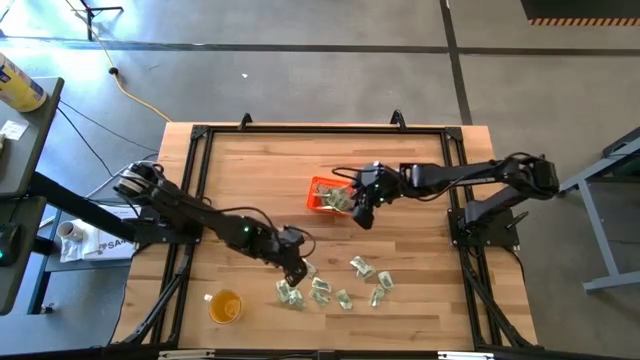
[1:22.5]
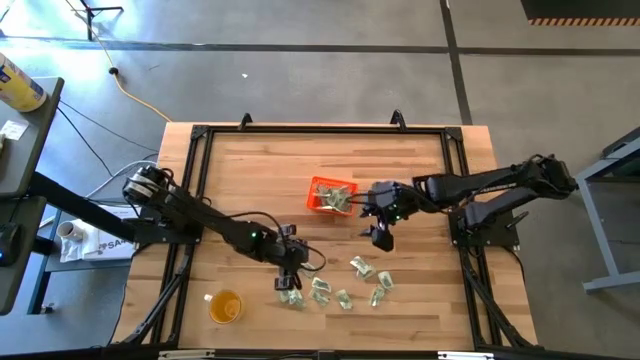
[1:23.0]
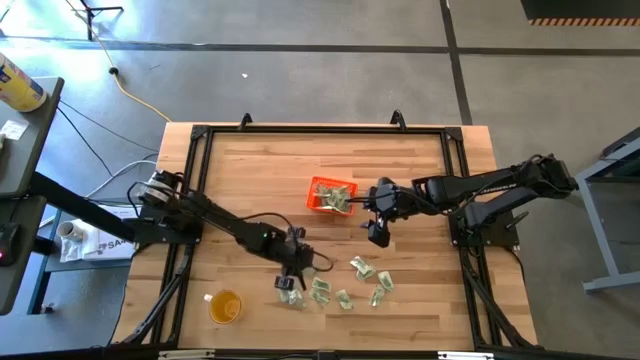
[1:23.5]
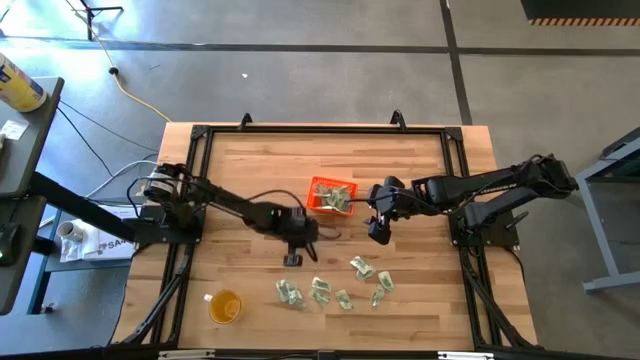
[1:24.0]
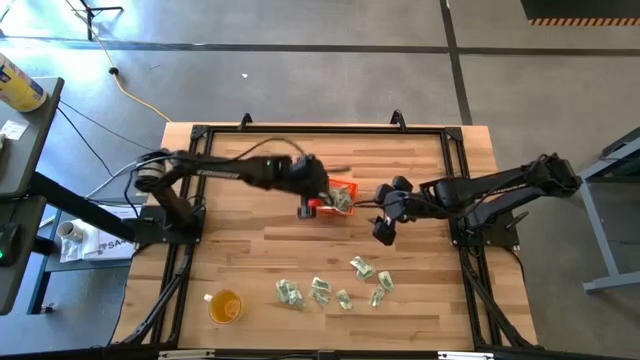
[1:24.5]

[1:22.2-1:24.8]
Task: Pick and place Stevia / Truvia into bins
Put the stevia packet into the basket

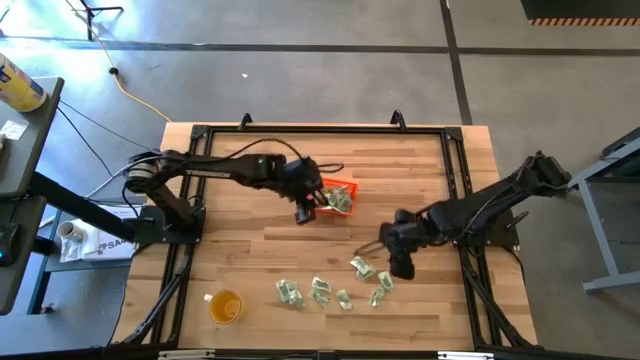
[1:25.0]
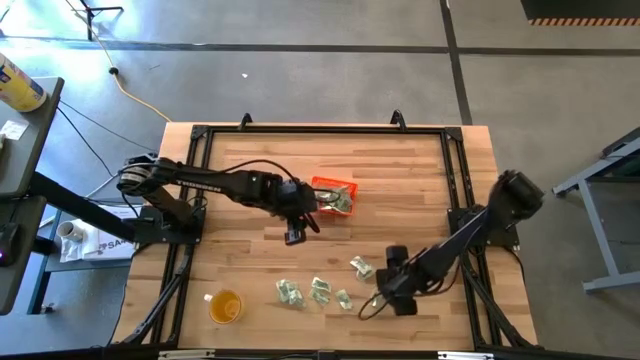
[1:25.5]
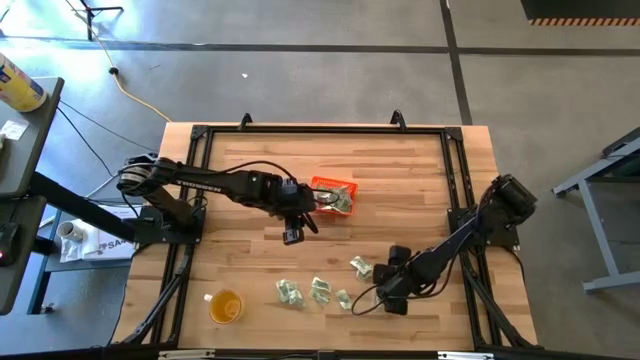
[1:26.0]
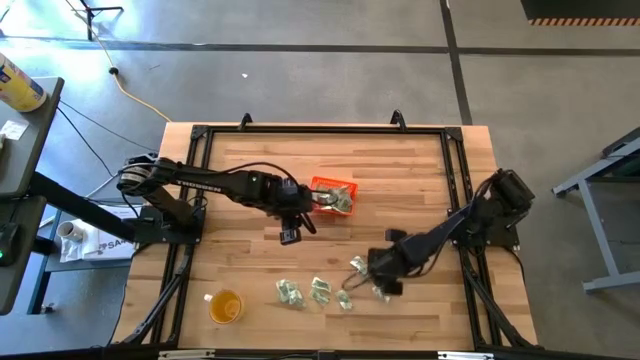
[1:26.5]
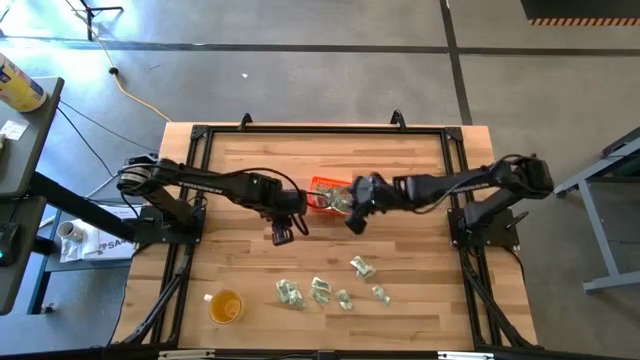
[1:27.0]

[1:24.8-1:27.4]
Put the stevia packet into the basket

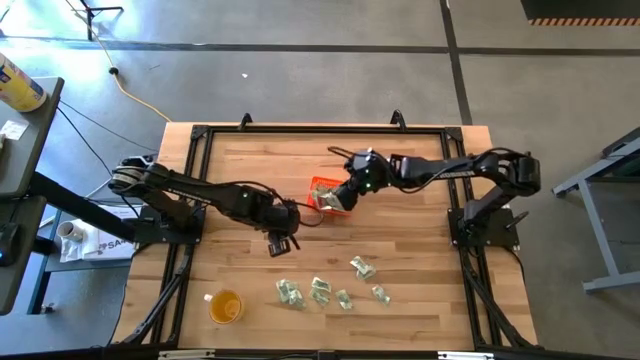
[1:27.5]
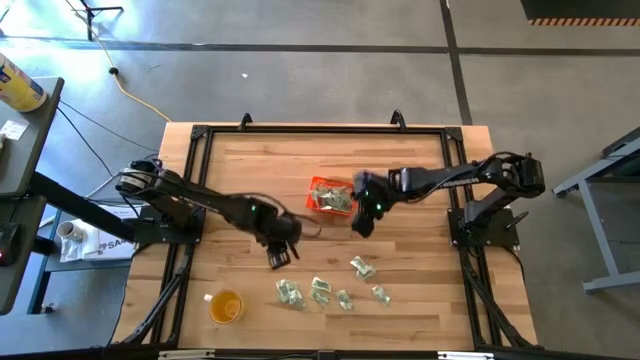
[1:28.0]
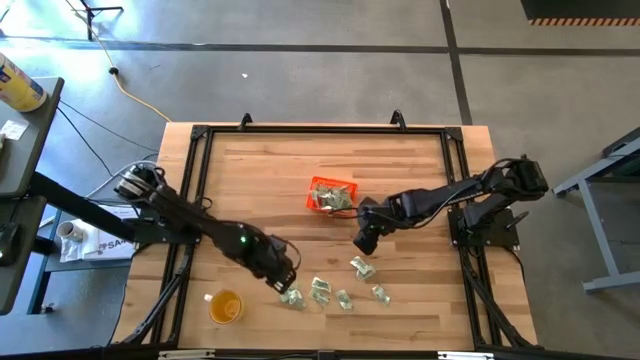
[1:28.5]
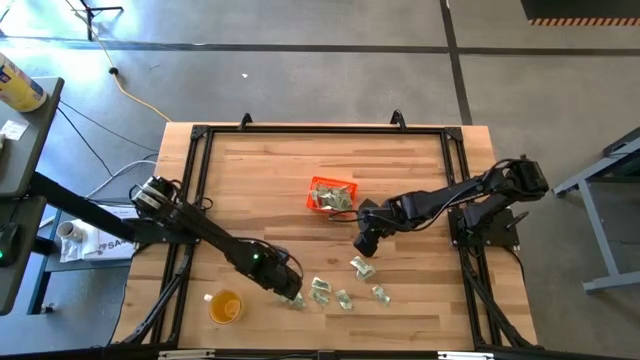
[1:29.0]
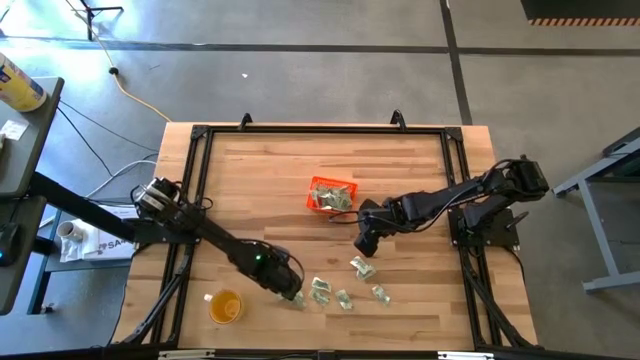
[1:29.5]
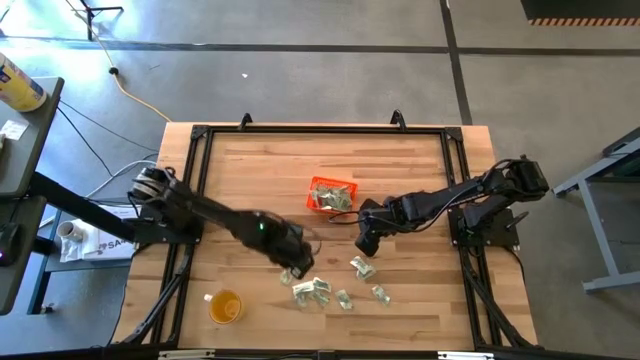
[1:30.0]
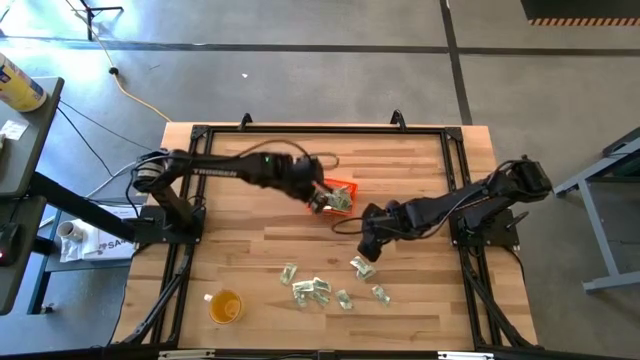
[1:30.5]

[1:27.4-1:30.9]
Put the stevia packet into the basket

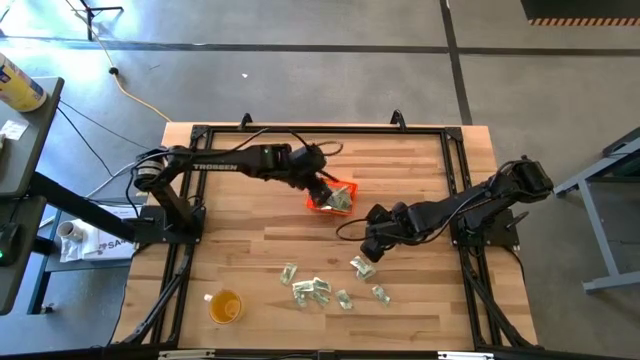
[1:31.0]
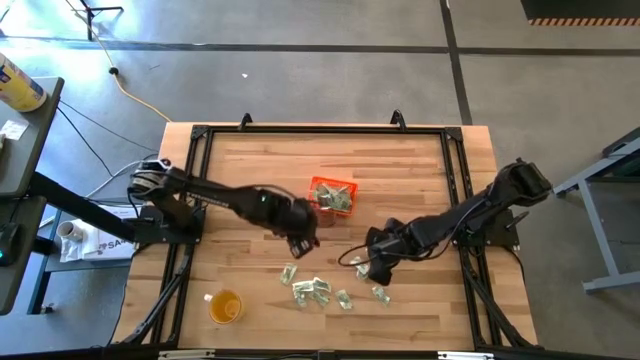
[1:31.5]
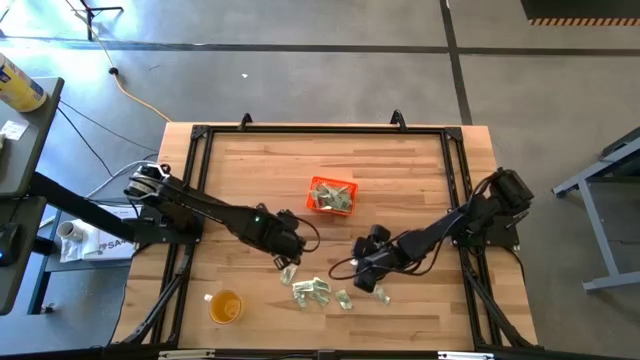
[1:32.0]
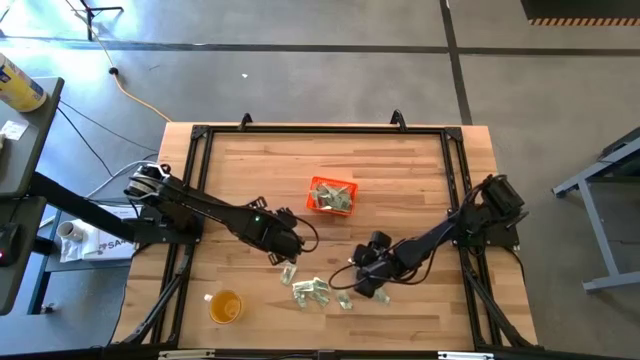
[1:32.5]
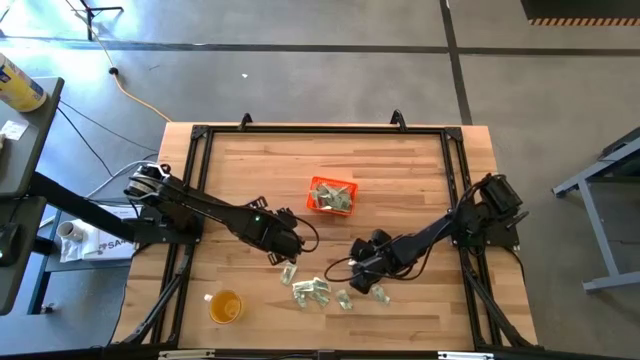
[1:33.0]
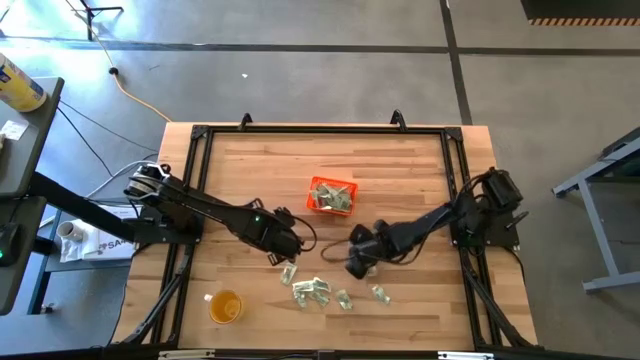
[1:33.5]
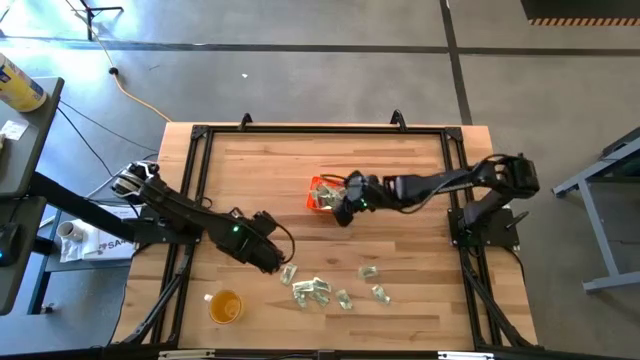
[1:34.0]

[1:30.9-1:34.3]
Put the stevia packet into the basket

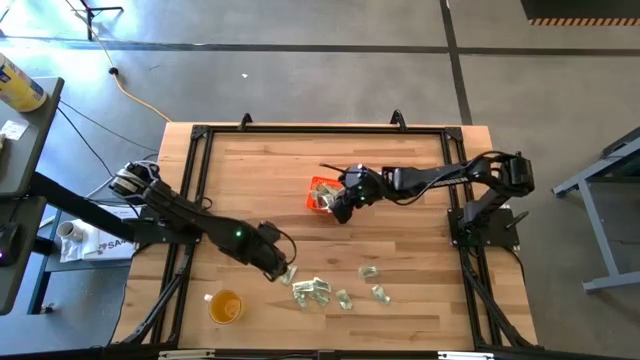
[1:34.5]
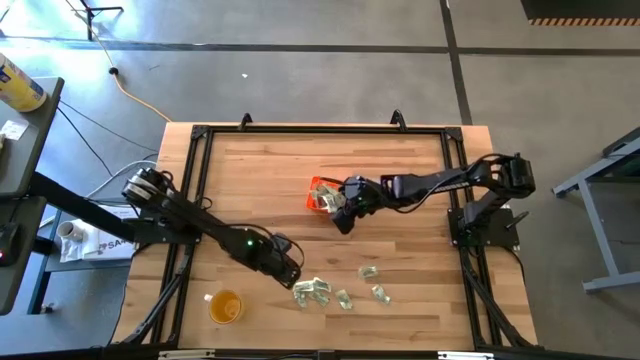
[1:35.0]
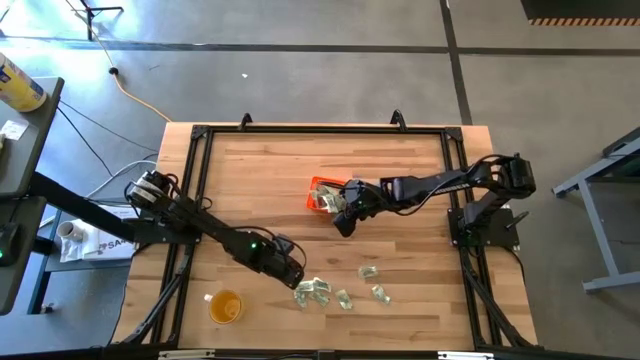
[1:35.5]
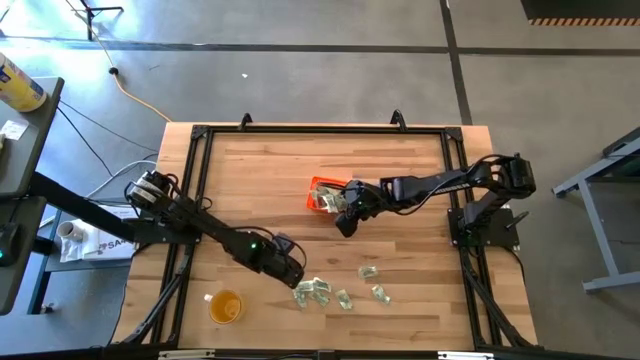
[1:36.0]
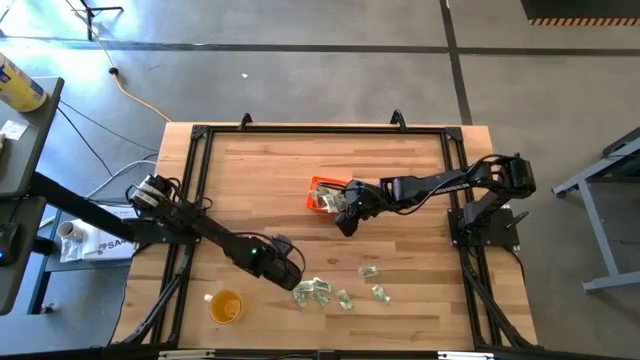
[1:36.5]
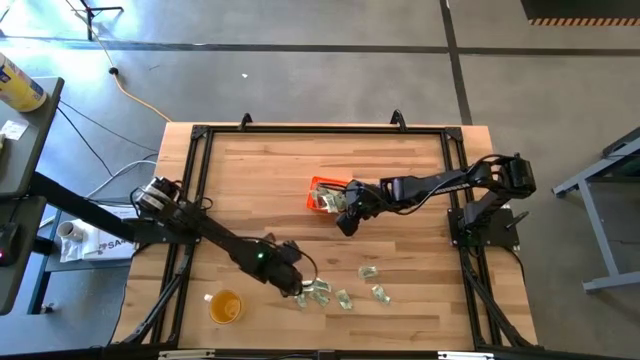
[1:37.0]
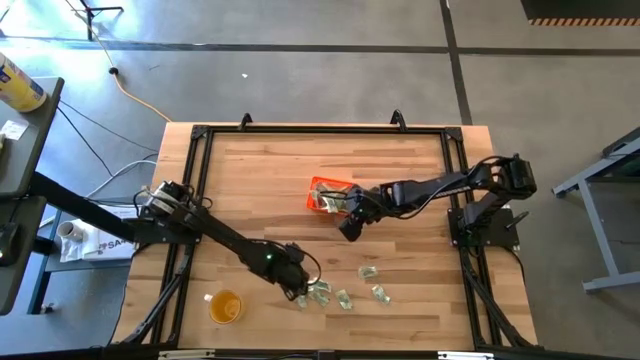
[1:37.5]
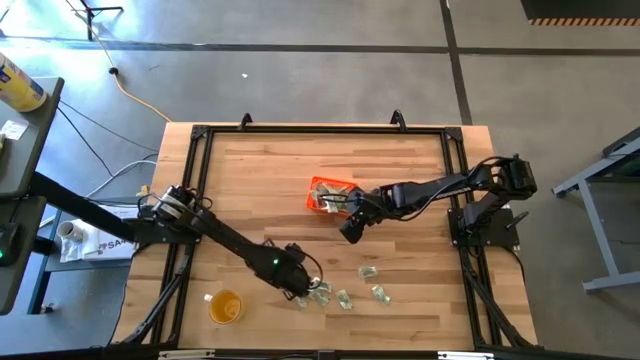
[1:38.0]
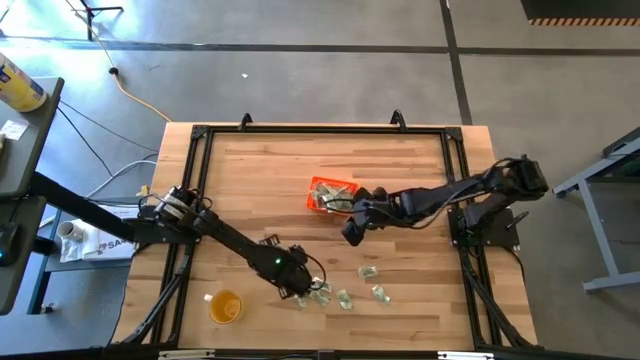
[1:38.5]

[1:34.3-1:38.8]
Put the stevia packet into the basket

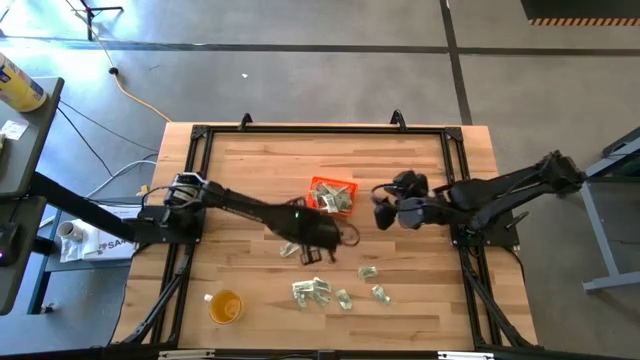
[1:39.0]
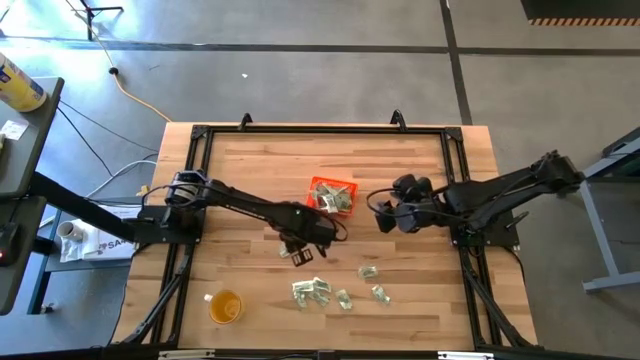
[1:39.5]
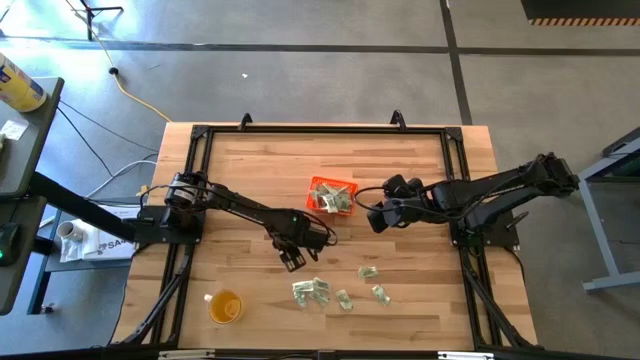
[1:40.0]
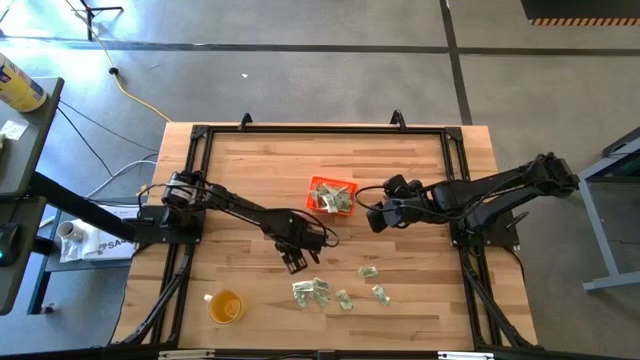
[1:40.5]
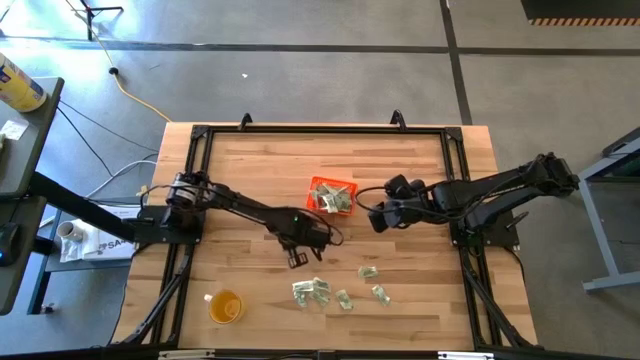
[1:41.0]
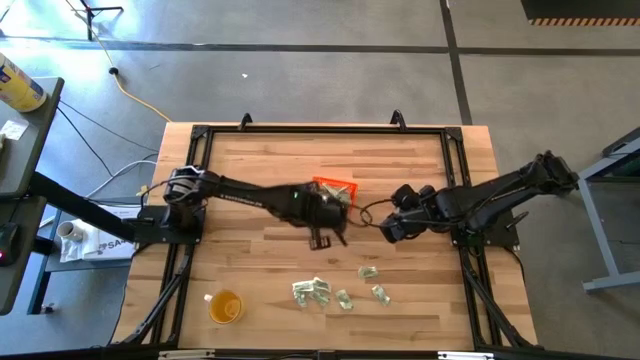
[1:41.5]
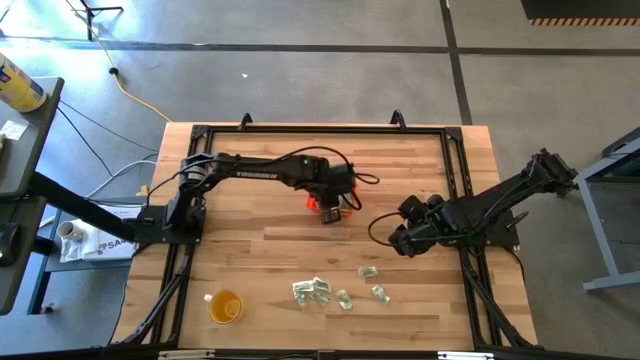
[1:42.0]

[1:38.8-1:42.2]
Put the stevia packet into the basket

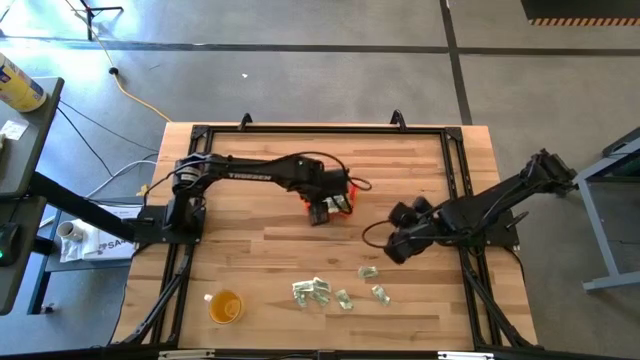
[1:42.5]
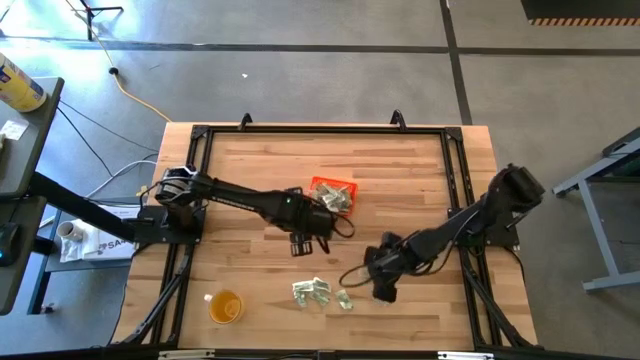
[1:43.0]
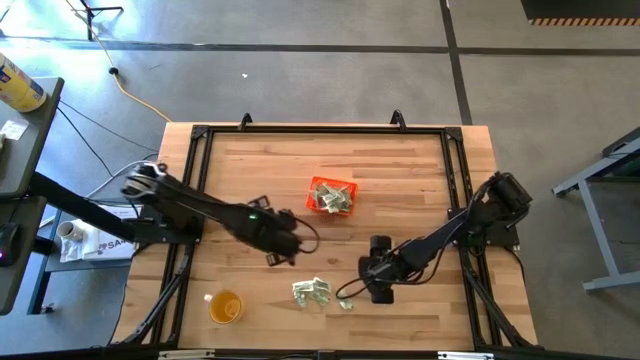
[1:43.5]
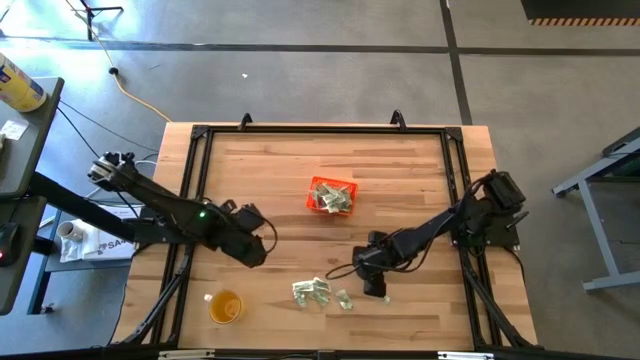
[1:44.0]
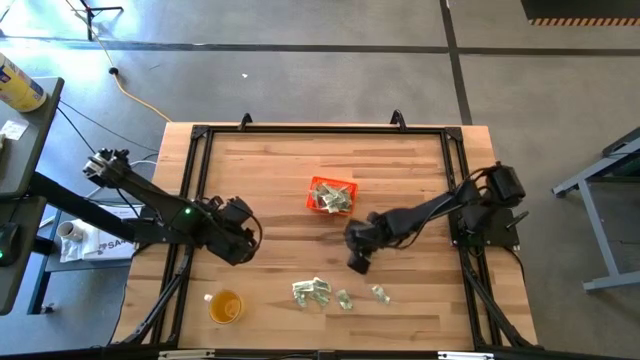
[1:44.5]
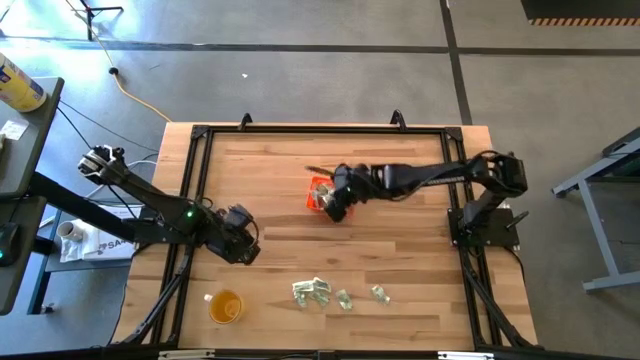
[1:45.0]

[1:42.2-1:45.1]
Put the stevia packet into the basket
